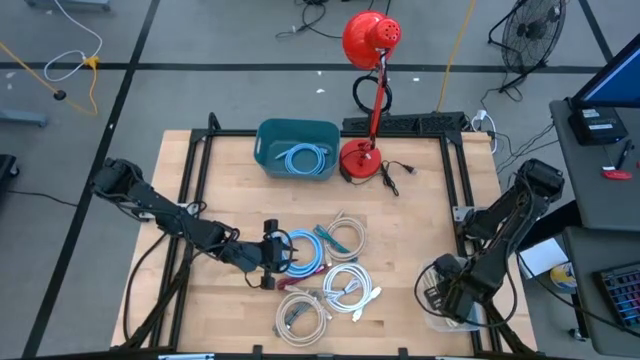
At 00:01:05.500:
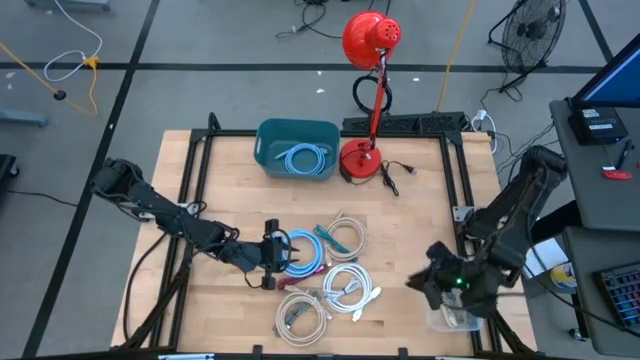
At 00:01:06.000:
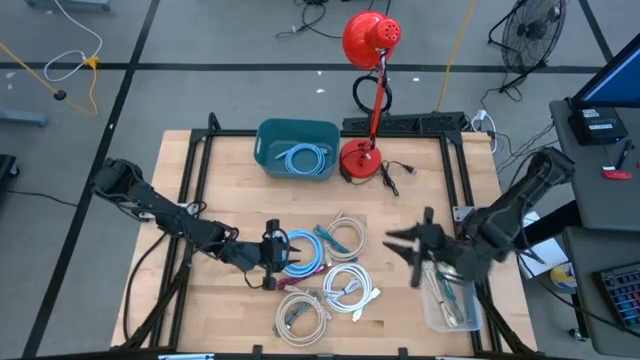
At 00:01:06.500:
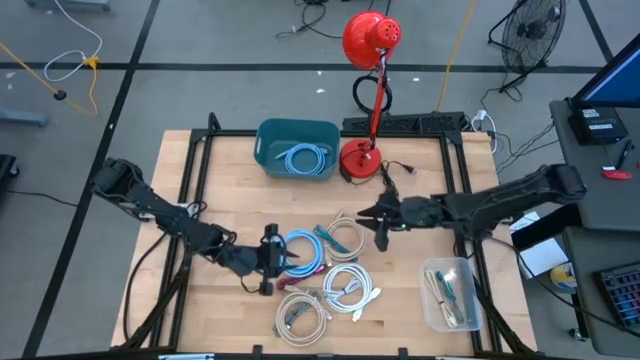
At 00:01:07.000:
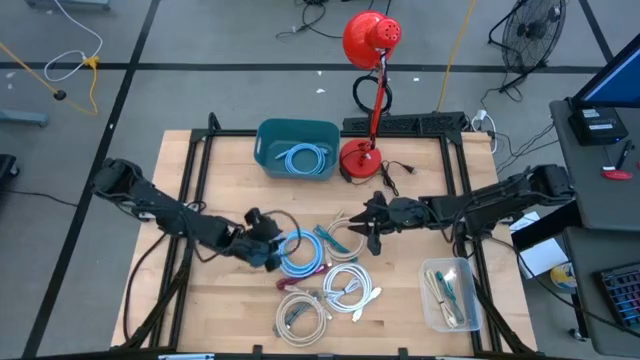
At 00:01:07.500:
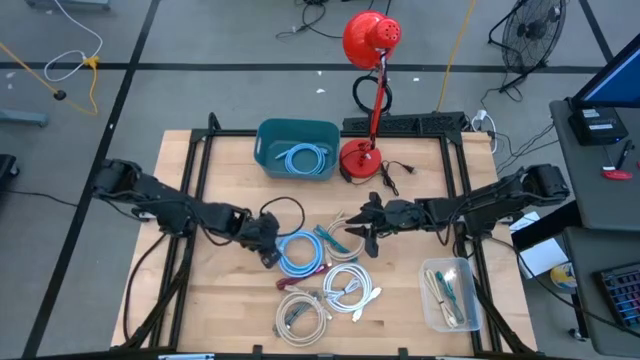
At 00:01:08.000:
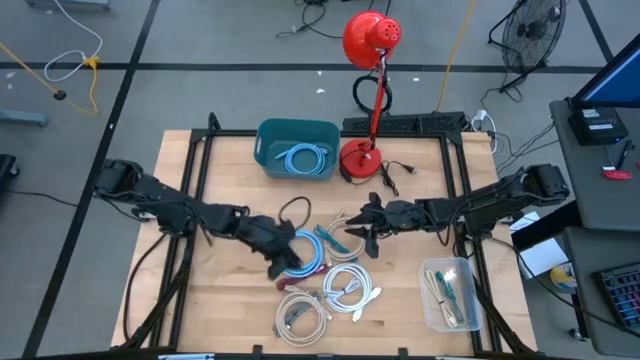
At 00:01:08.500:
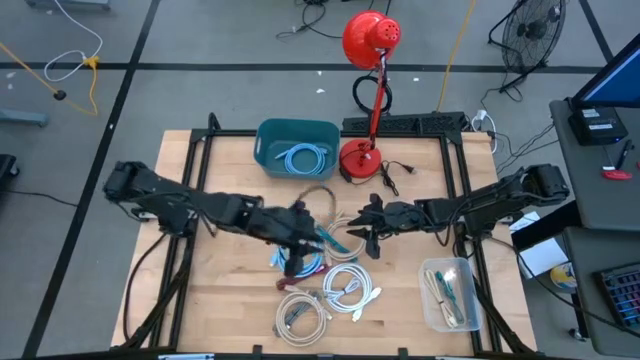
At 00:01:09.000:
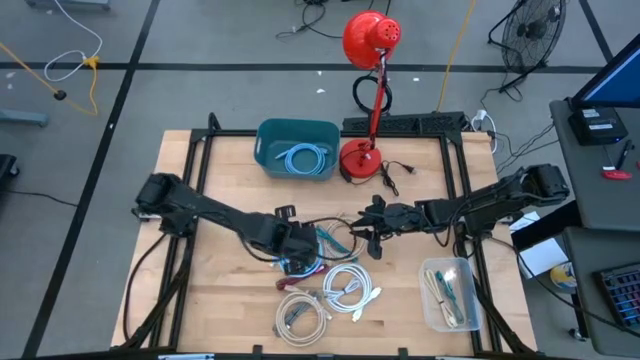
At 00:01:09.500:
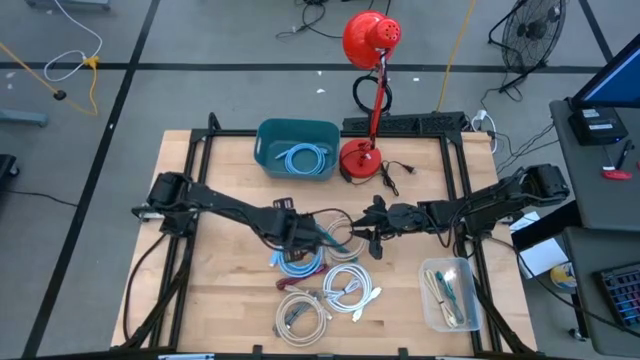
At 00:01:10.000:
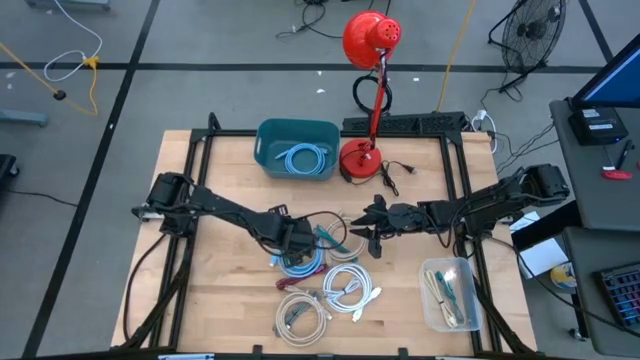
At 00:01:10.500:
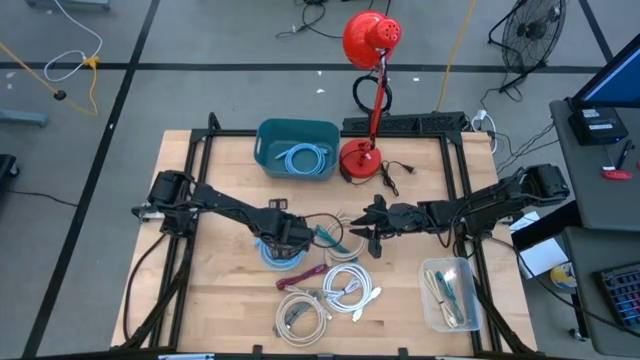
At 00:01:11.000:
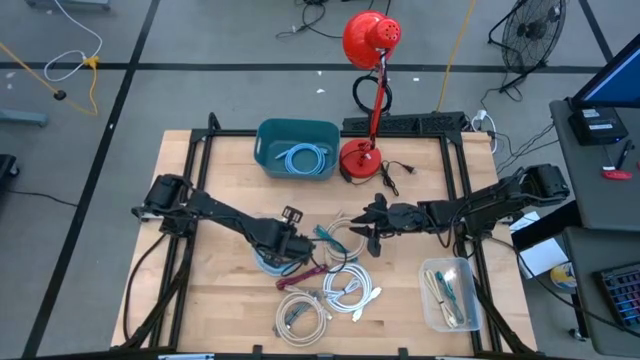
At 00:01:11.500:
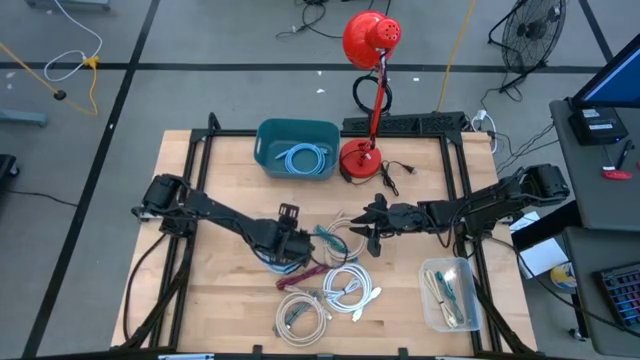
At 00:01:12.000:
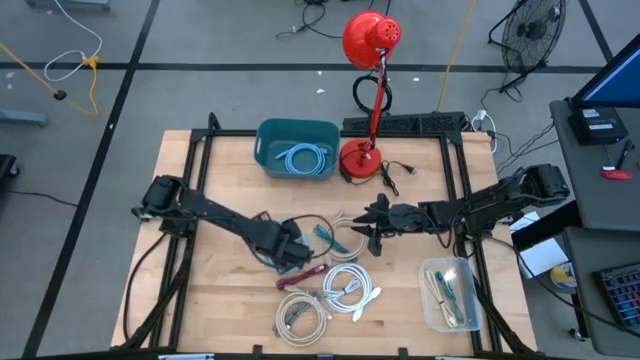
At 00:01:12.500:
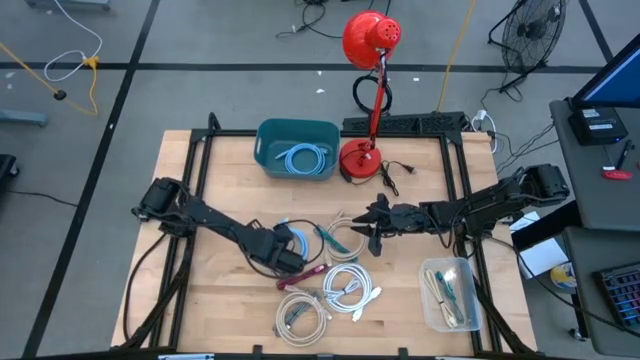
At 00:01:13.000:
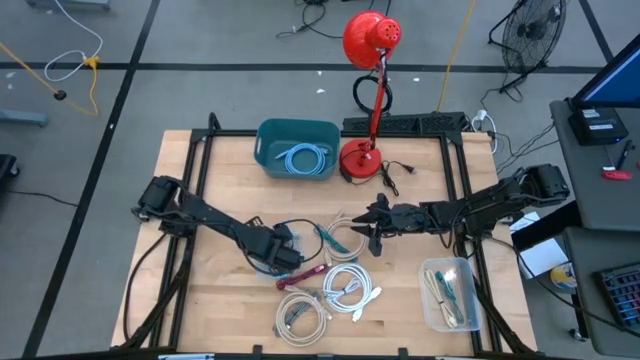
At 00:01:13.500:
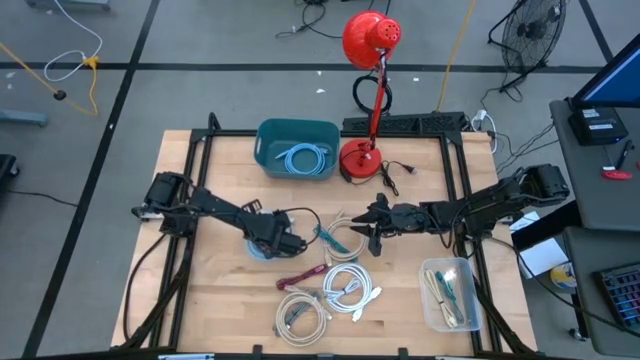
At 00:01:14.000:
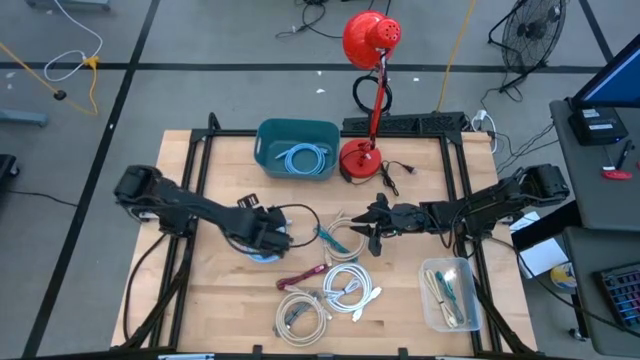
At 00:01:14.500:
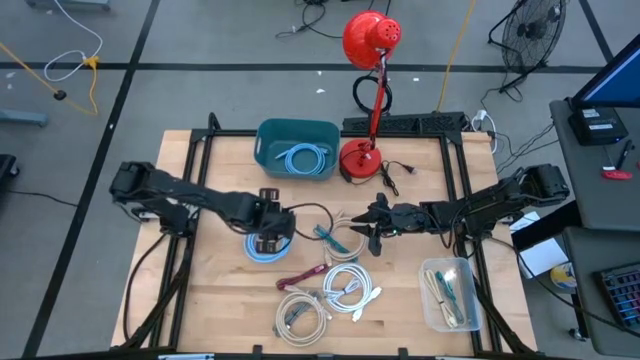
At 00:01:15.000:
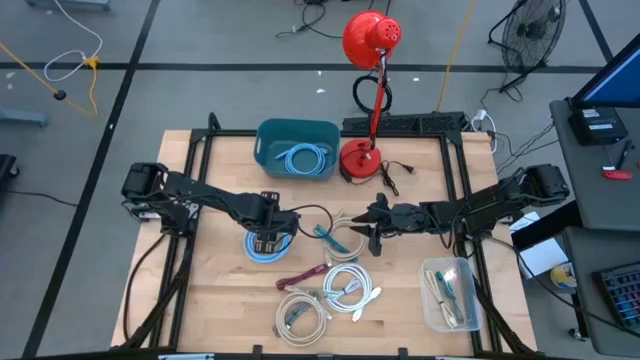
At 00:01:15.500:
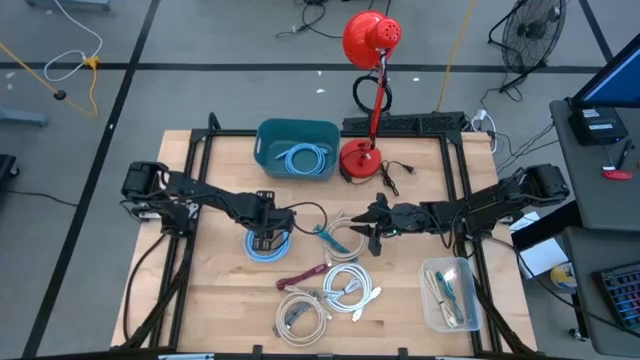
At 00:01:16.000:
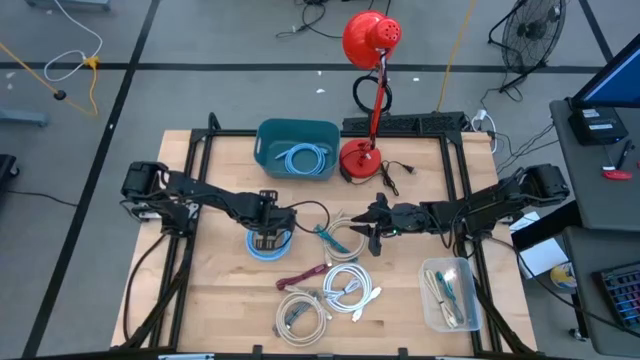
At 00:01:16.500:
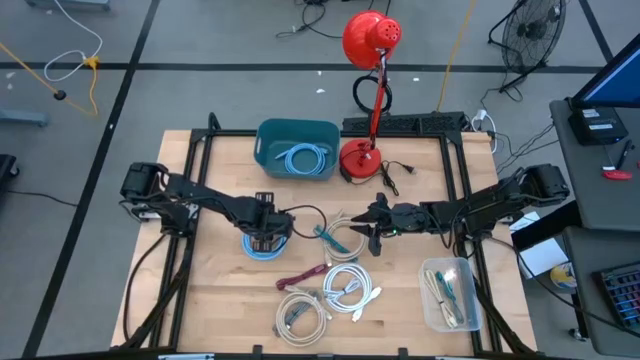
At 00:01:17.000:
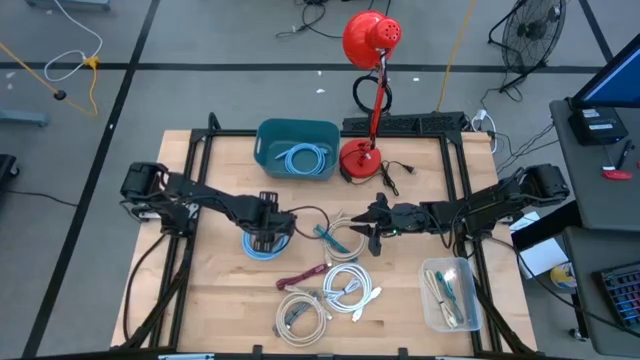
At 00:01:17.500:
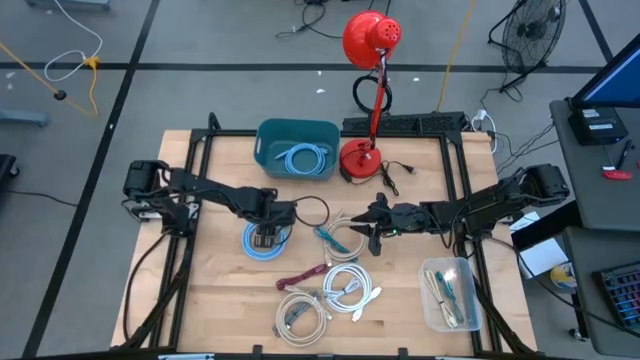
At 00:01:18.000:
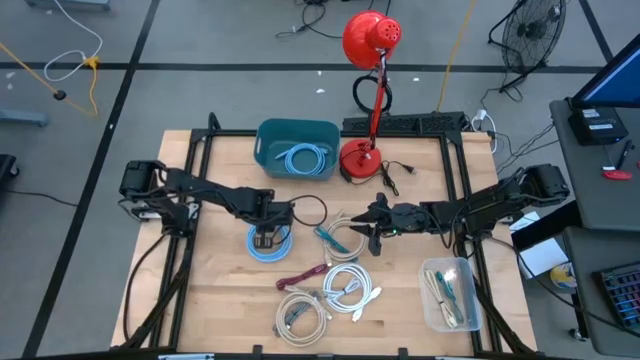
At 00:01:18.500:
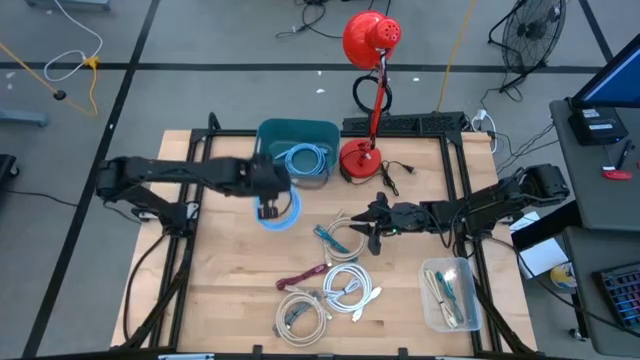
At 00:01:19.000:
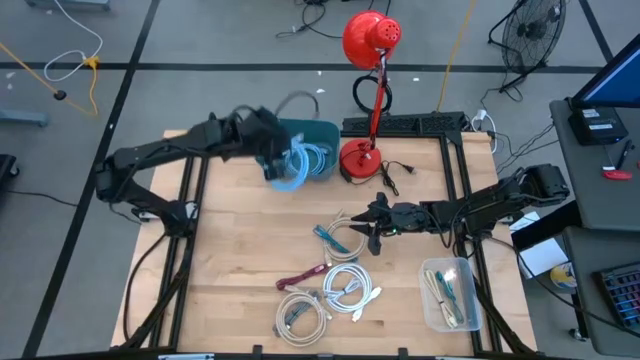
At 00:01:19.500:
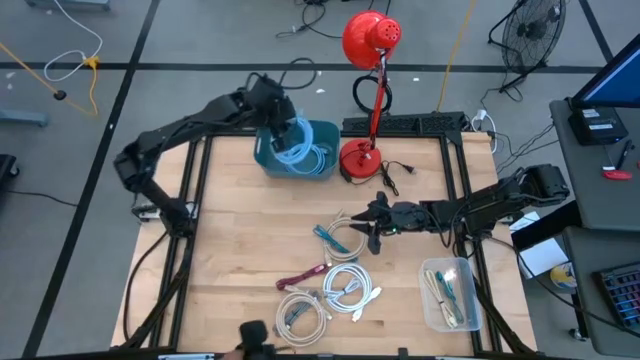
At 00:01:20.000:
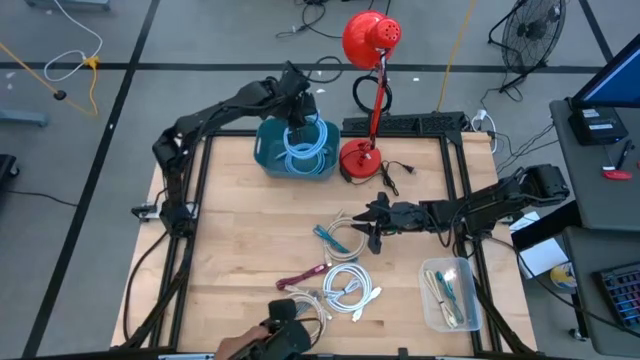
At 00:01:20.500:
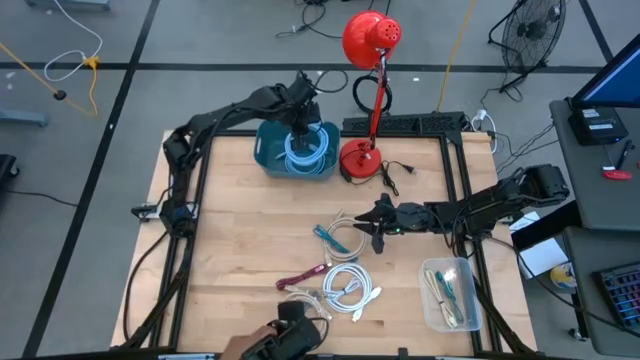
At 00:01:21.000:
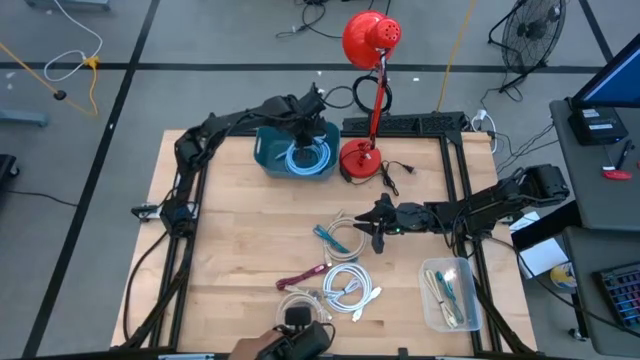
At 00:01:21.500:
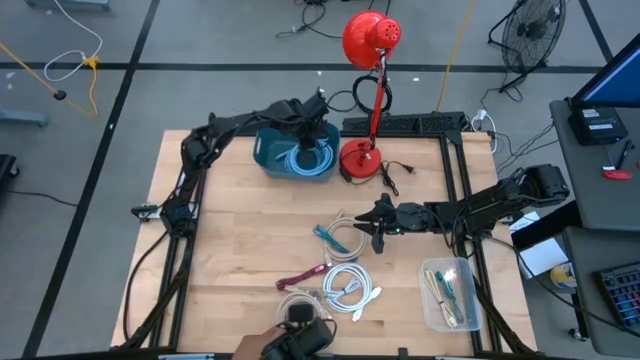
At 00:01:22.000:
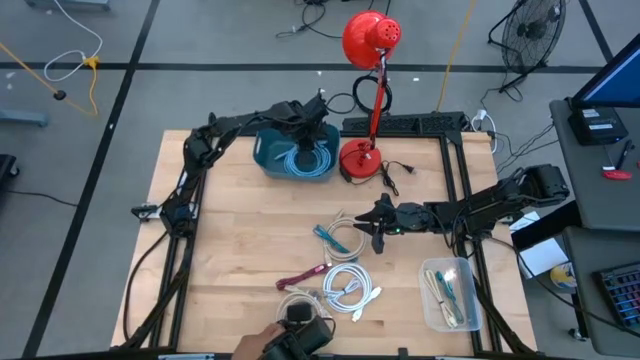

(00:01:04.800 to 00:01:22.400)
Task: Pick & Place USB Port
Put the light blue hdmi cable into the blue bin

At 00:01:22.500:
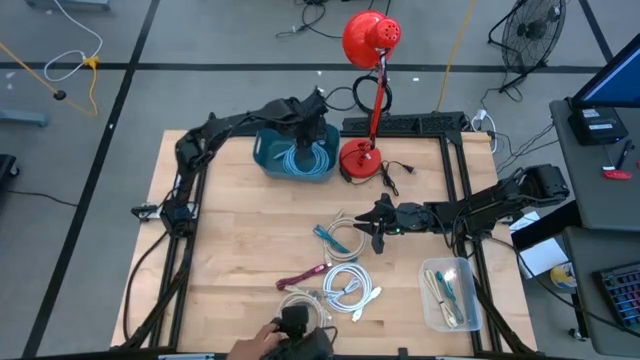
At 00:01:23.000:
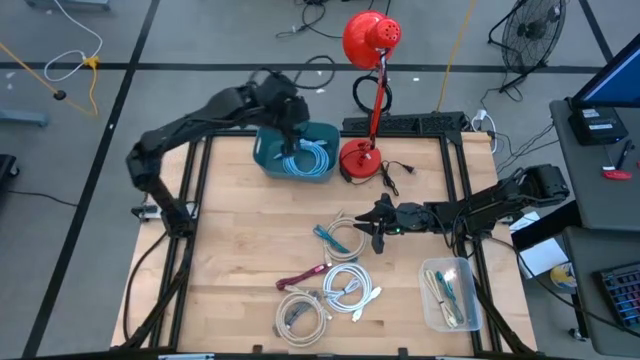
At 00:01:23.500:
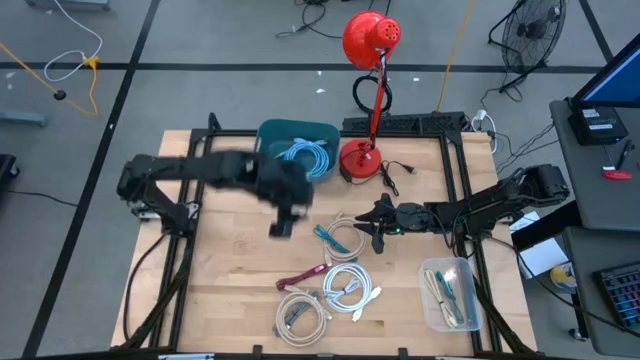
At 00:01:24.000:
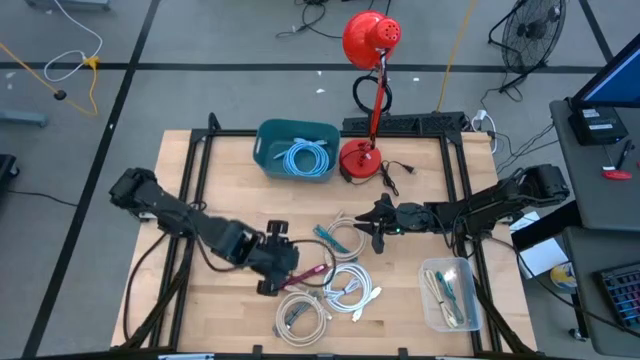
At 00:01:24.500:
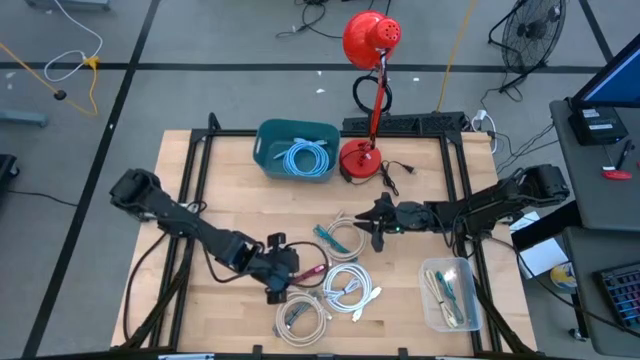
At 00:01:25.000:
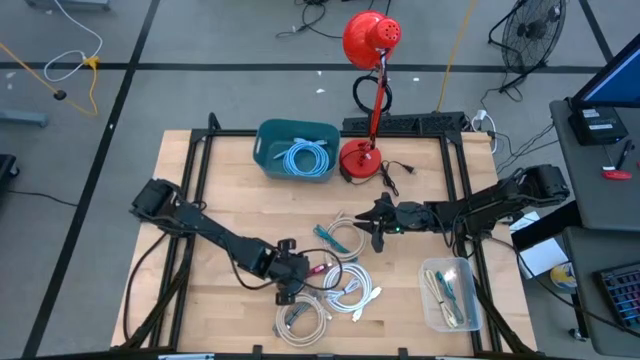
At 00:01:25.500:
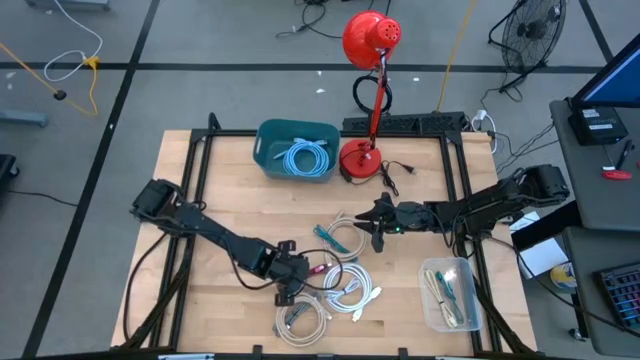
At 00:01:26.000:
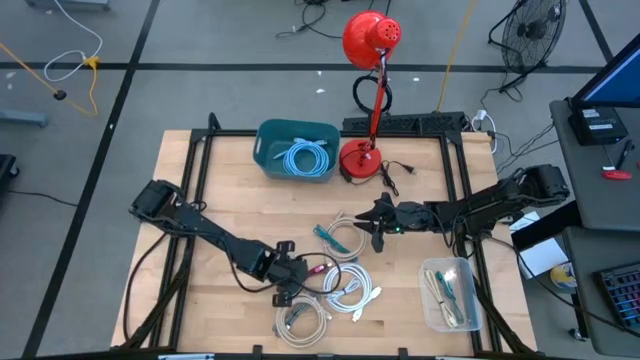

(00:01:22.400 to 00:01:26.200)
Put the red charger cable into the transparent bin
